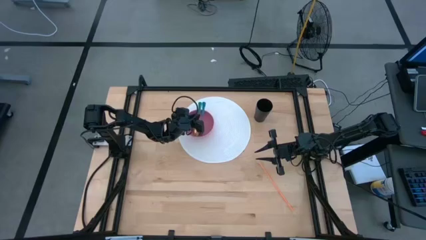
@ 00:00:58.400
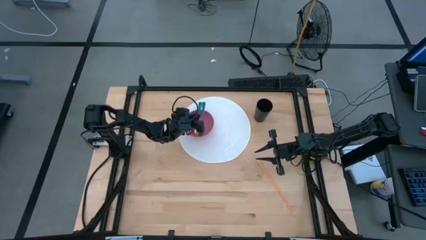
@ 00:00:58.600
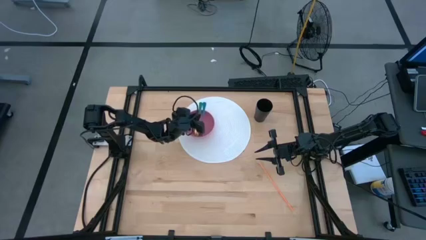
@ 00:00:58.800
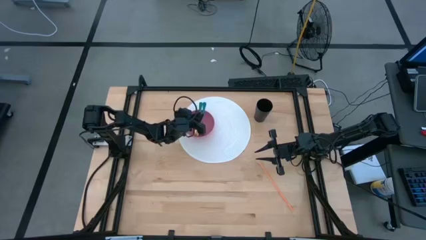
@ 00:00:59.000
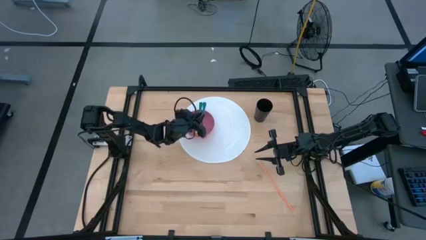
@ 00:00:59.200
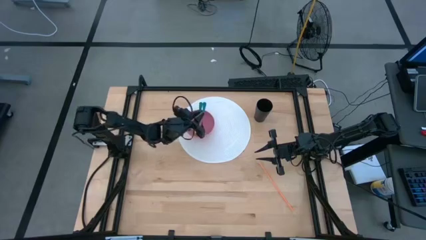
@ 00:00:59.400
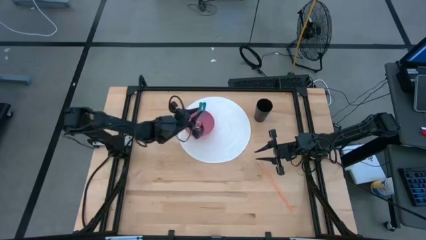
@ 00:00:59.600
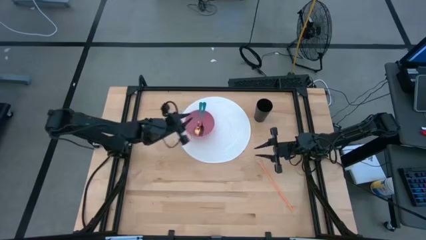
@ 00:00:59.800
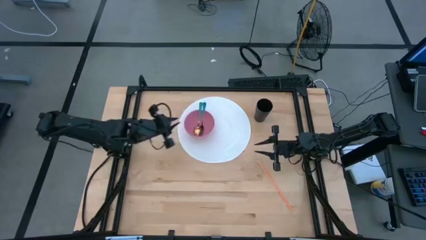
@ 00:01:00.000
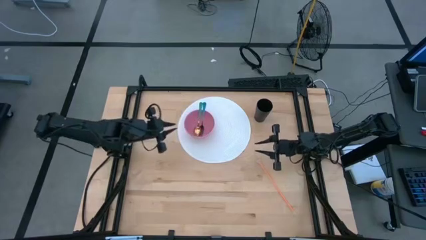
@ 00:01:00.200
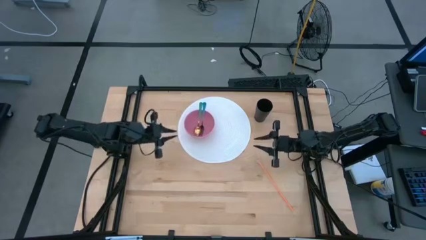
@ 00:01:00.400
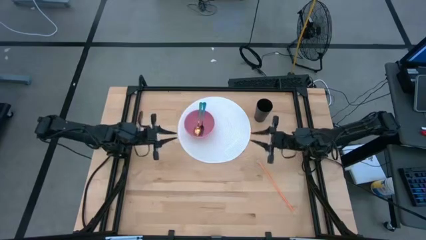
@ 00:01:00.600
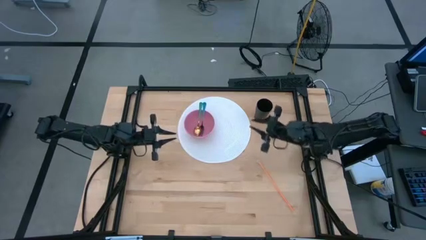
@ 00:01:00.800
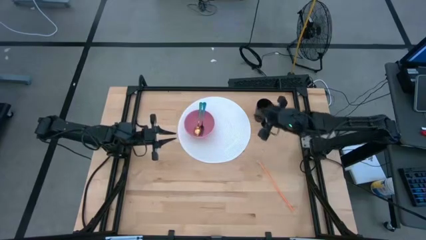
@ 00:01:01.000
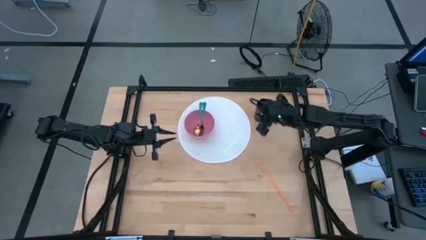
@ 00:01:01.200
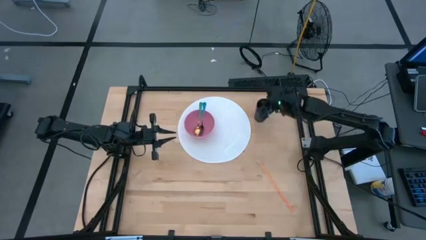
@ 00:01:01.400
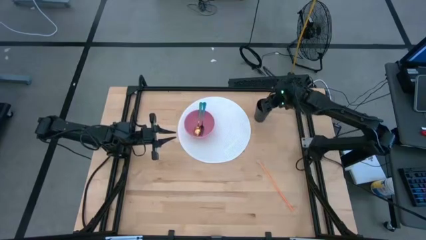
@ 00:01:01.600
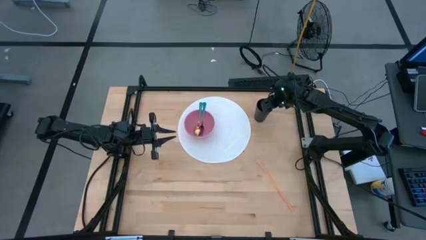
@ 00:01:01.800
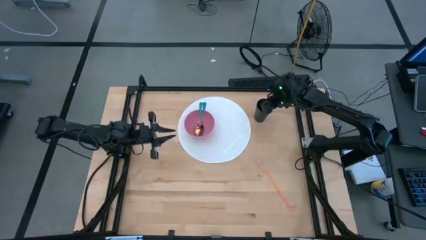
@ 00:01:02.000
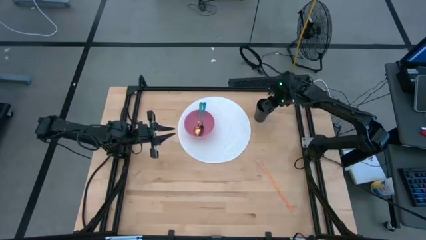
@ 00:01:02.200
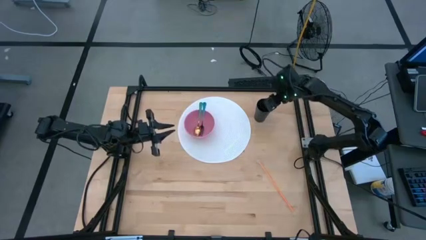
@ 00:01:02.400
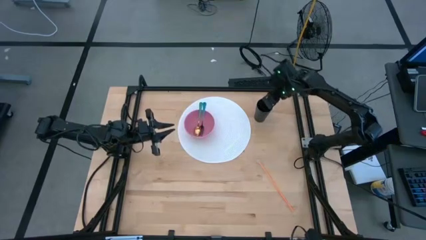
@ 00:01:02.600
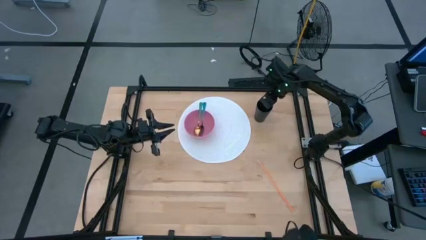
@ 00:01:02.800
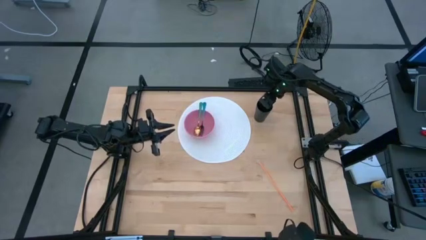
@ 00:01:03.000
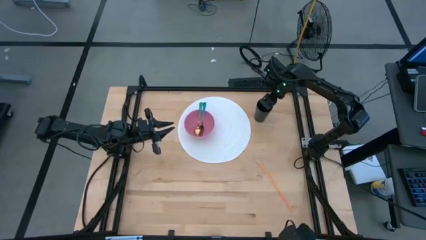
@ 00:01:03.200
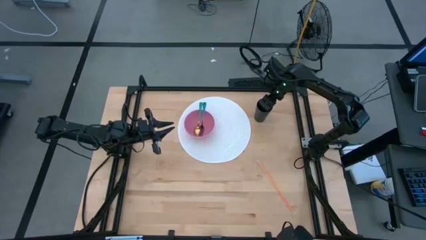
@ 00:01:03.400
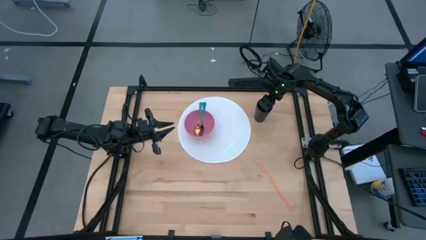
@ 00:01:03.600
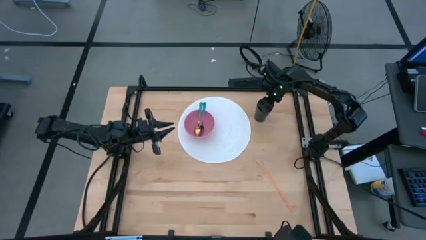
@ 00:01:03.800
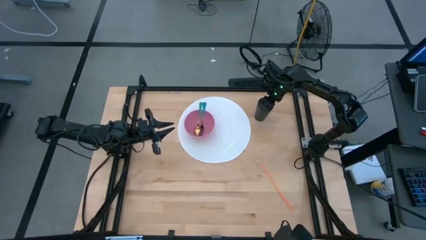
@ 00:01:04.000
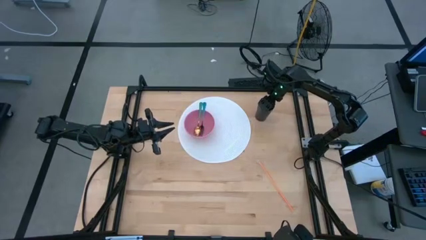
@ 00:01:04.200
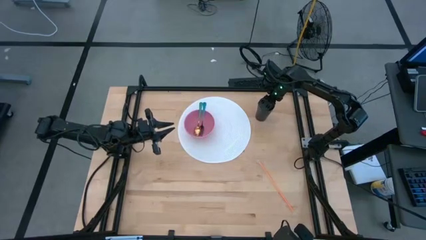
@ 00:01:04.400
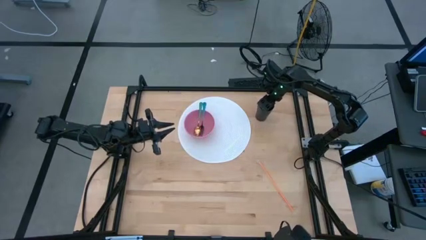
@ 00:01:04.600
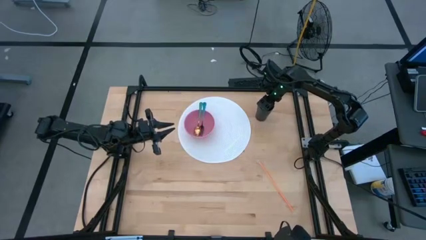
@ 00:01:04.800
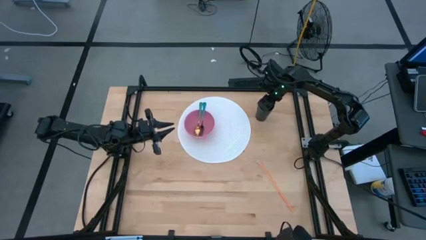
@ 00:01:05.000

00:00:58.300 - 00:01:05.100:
Task: Pick & Place Utensil
Put the black cup on the white mat

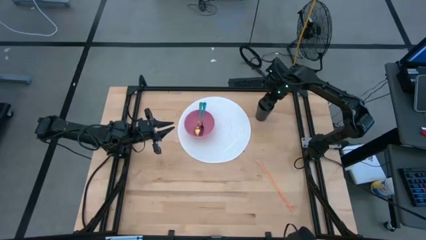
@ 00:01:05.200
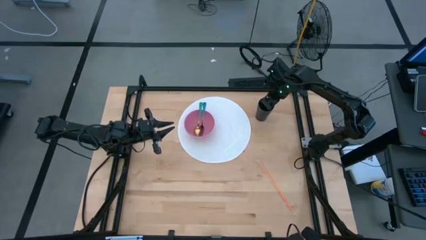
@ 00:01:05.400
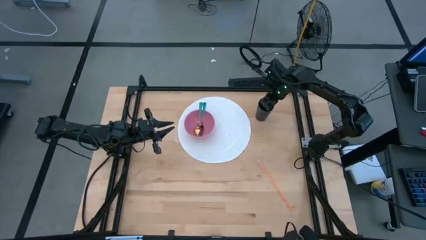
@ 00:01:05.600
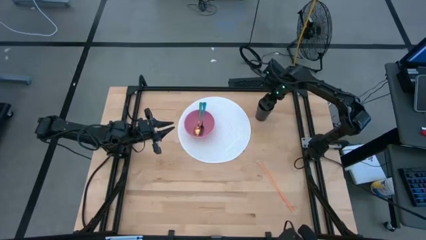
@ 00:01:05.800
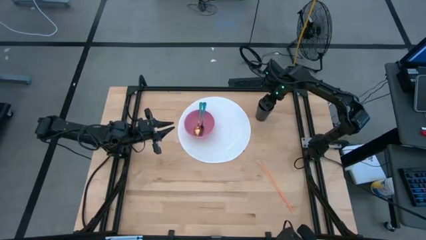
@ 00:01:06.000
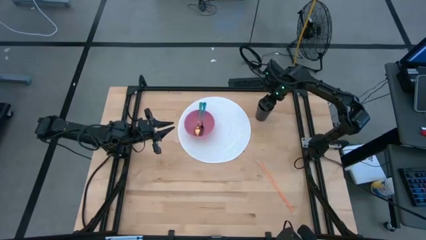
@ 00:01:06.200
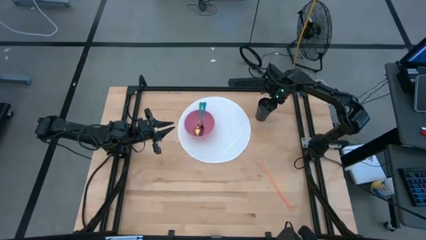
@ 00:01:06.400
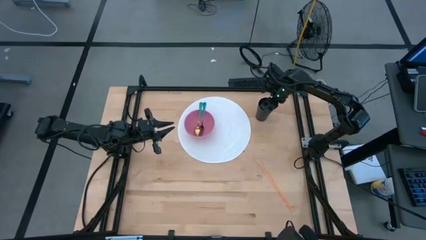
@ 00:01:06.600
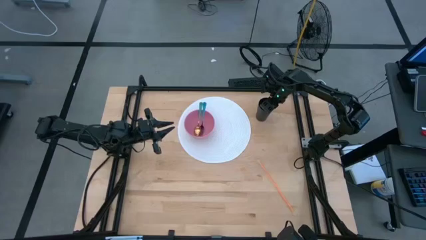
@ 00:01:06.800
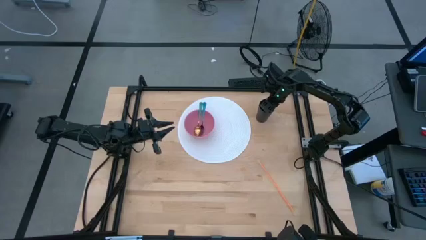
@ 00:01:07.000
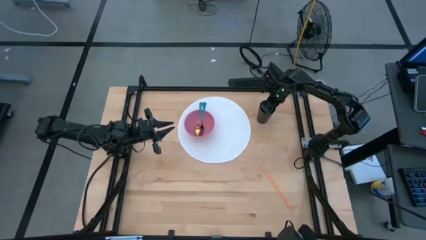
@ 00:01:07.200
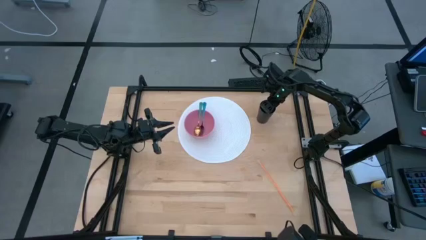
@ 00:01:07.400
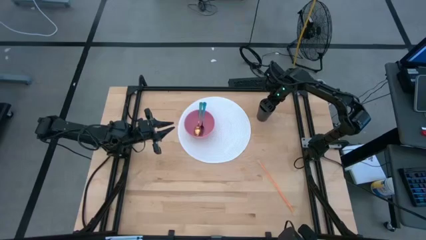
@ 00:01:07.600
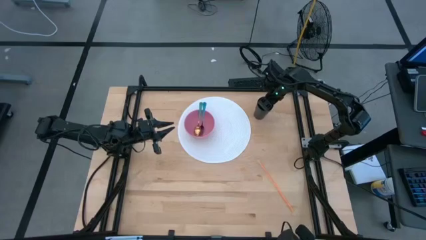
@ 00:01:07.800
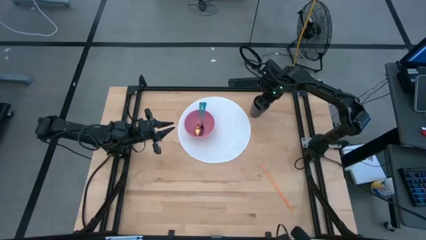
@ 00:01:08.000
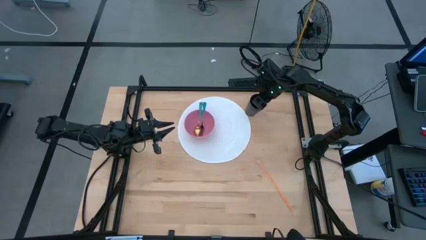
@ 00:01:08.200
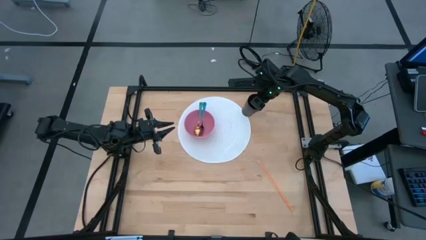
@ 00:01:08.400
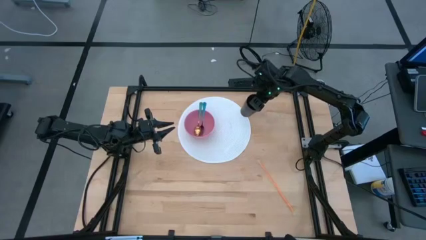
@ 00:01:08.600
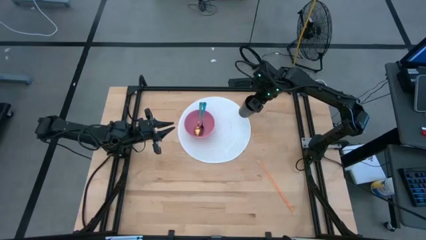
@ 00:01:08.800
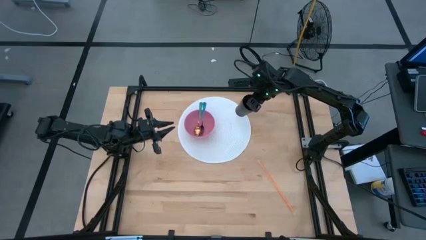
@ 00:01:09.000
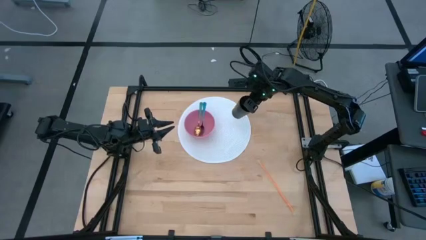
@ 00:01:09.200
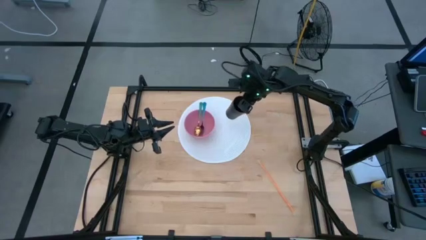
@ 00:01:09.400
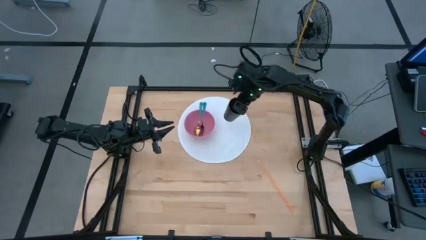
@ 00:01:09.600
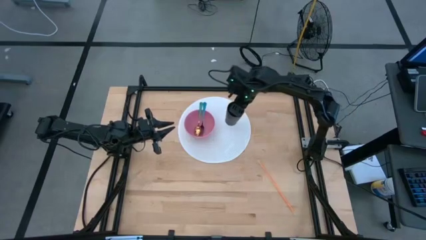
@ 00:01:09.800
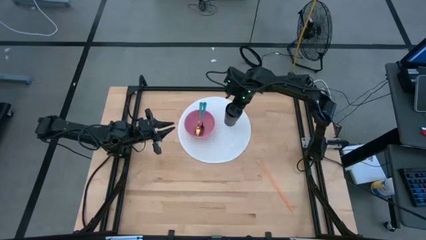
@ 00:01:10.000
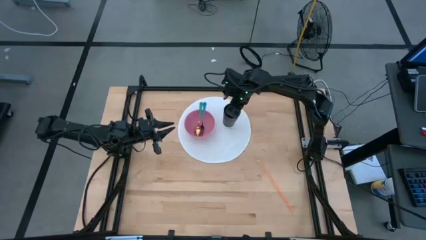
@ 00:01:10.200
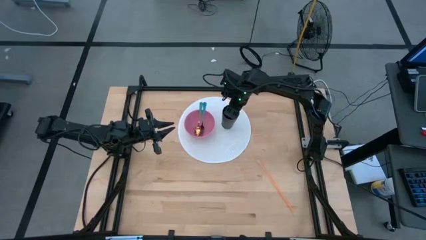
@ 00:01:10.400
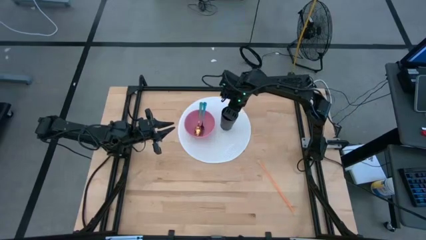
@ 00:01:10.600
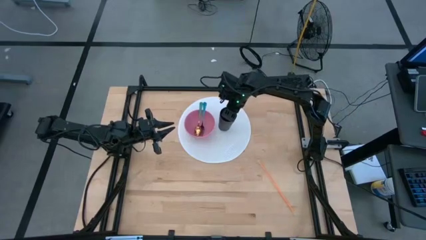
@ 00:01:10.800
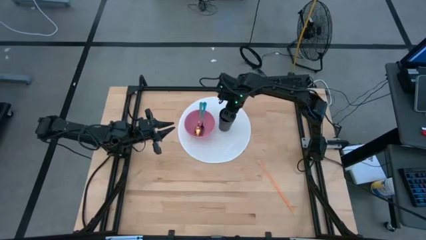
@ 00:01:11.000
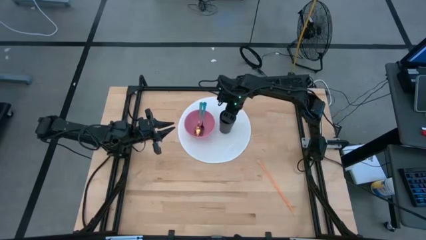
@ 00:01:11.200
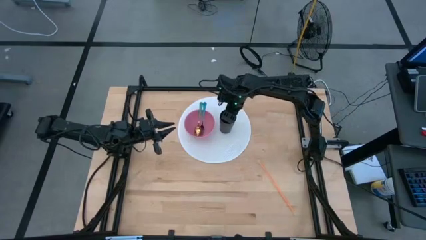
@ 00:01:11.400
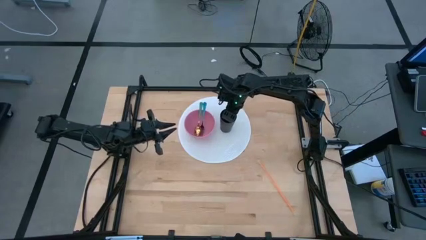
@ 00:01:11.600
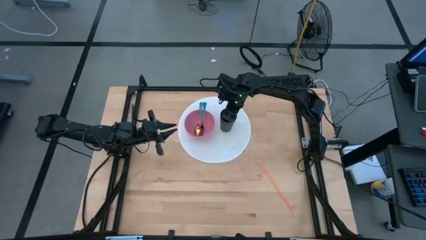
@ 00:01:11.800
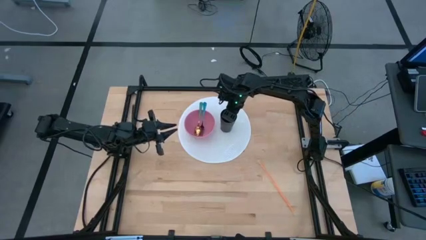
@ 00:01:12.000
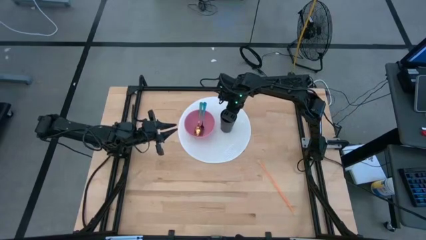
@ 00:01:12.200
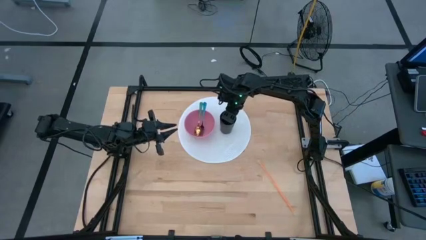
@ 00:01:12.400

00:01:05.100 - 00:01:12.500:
Put the black cup on the white mat to the right of the pink plate

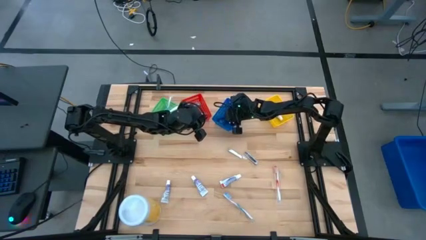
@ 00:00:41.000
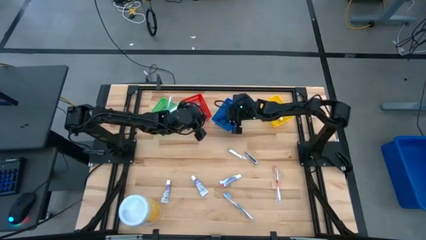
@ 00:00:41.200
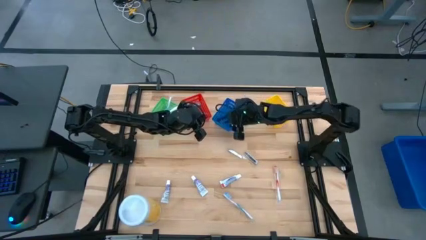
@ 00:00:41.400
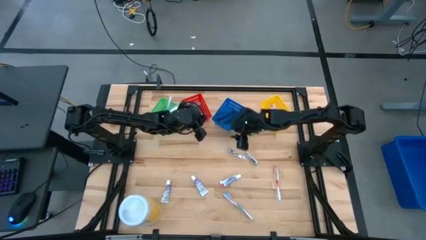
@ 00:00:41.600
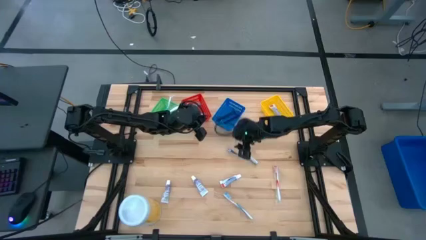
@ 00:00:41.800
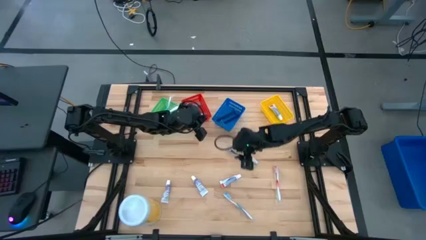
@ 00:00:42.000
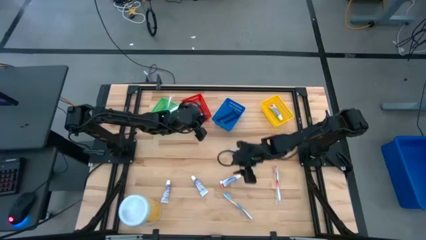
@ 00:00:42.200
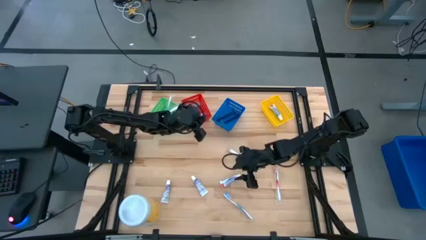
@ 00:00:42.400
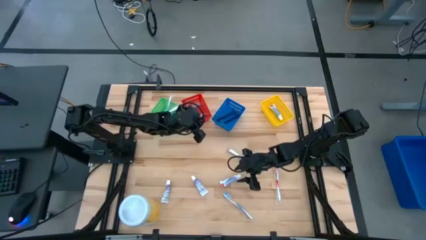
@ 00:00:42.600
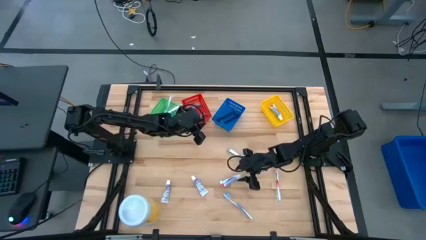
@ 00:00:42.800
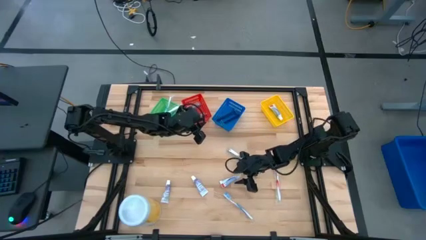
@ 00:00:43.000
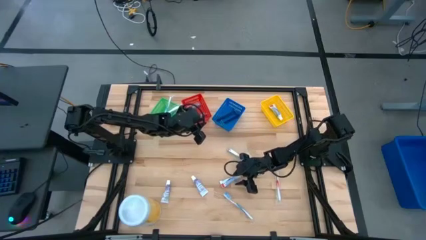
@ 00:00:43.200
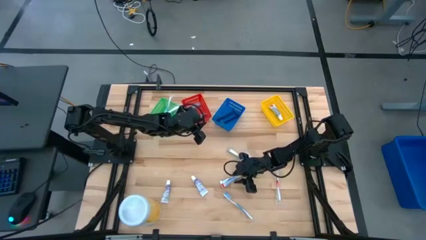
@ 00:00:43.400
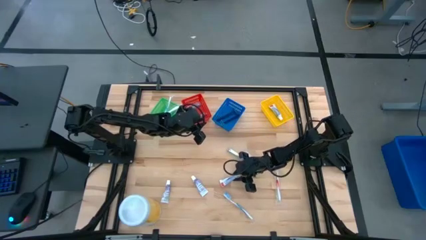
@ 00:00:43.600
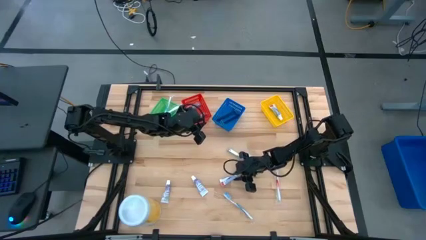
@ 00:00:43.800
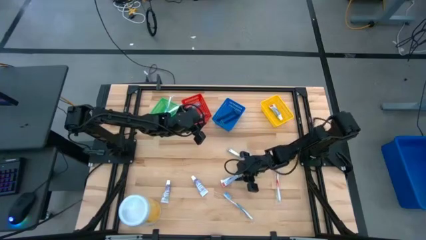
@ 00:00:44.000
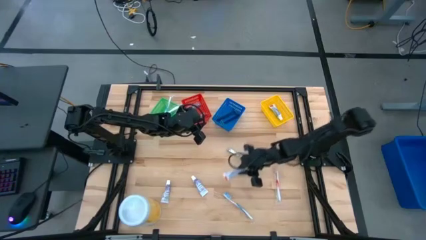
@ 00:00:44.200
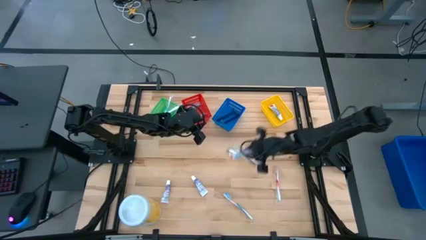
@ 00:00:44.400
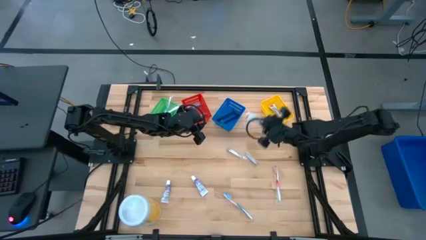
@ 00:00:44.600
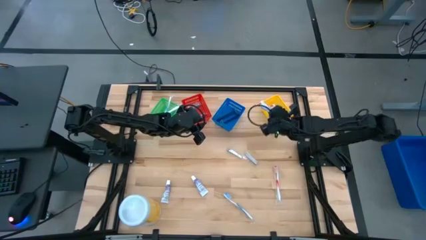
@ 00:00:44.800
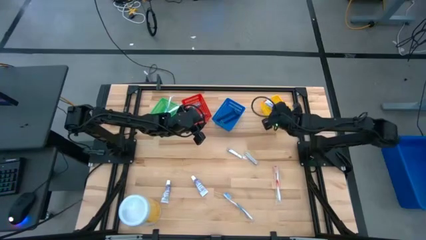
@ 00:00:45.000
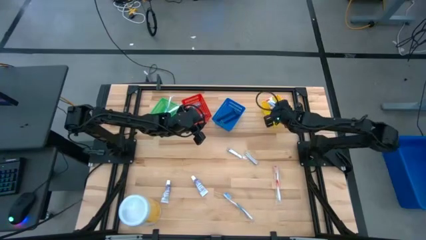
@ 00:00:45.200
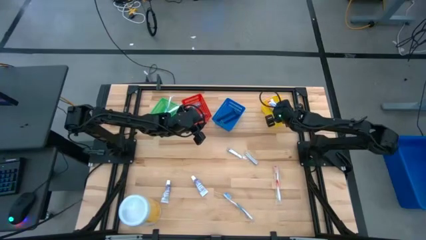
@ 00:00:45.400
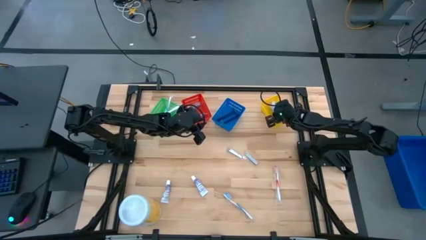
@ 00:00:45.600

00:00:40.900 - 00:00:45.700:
Task: Pick & Place Travel size toiletries
Put the right toothpaste into the yellow basket
